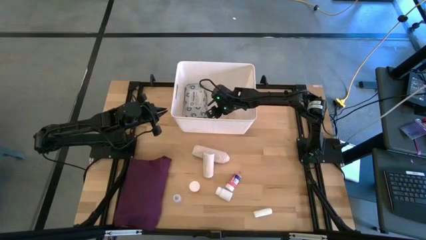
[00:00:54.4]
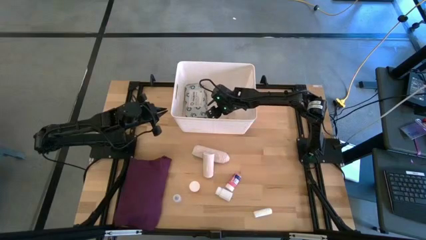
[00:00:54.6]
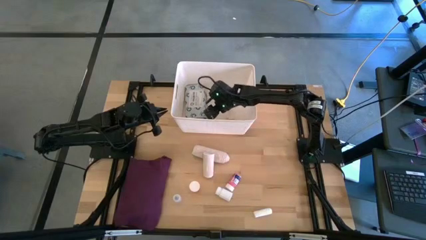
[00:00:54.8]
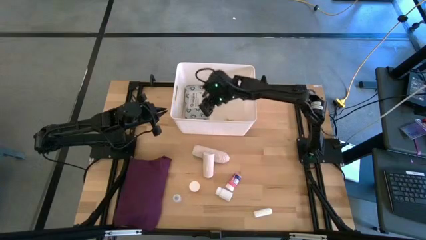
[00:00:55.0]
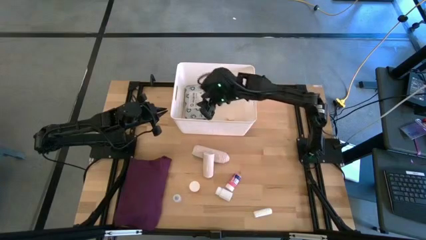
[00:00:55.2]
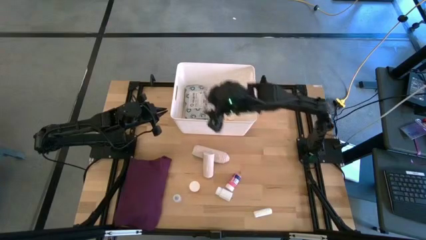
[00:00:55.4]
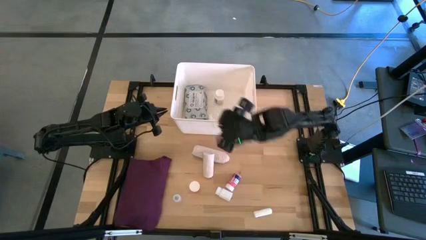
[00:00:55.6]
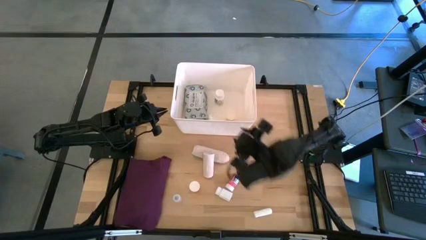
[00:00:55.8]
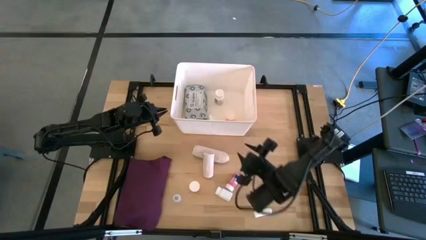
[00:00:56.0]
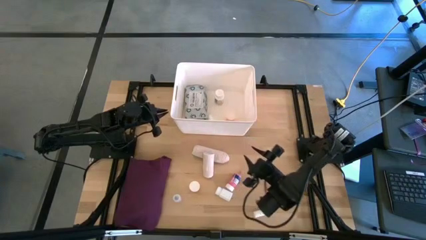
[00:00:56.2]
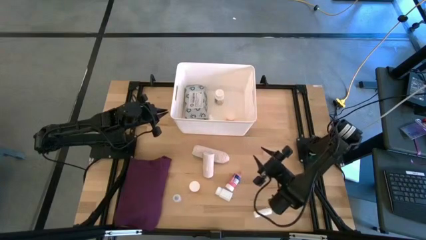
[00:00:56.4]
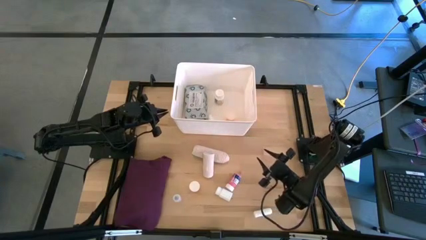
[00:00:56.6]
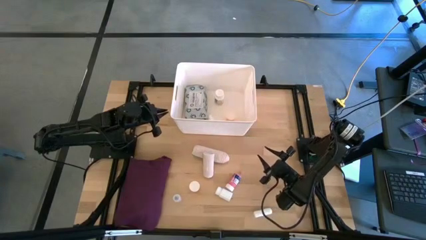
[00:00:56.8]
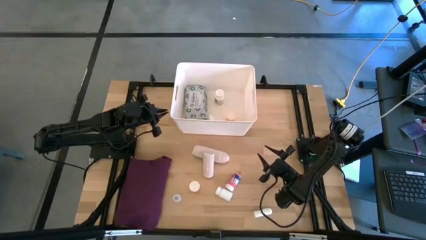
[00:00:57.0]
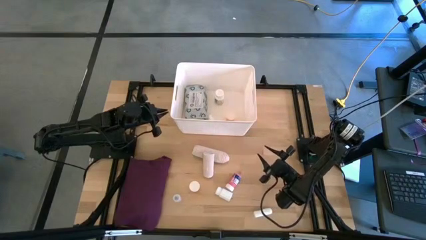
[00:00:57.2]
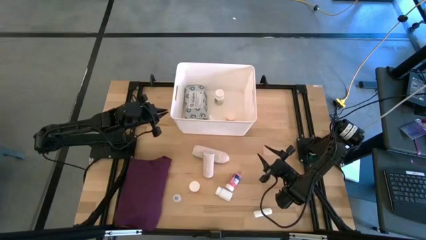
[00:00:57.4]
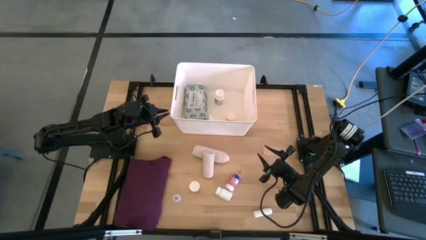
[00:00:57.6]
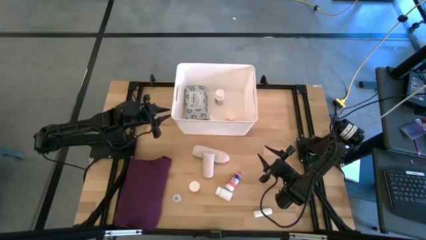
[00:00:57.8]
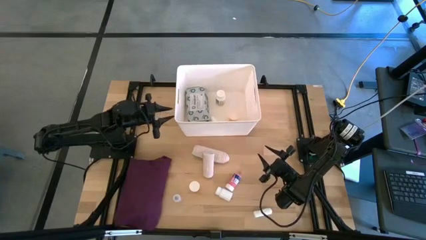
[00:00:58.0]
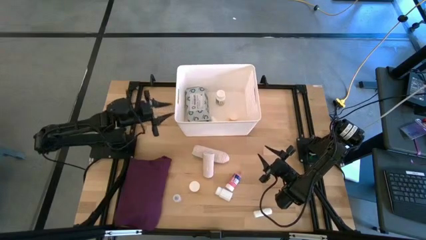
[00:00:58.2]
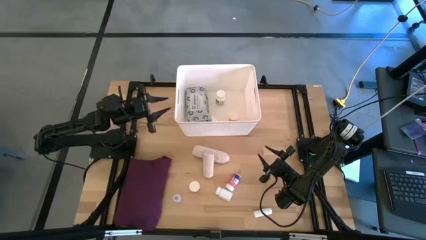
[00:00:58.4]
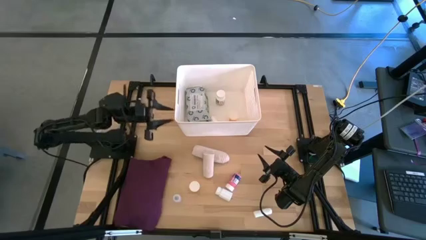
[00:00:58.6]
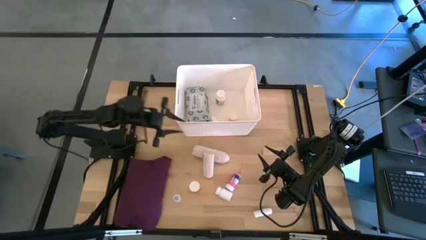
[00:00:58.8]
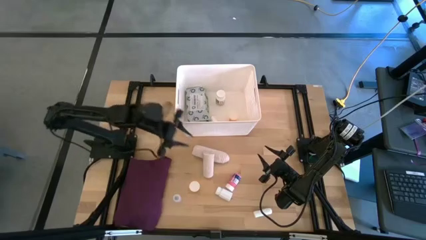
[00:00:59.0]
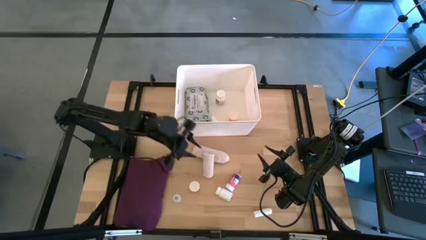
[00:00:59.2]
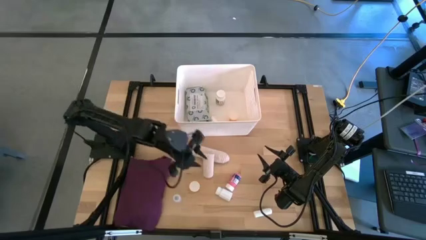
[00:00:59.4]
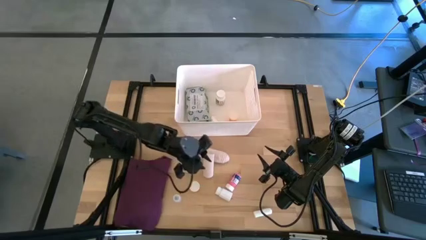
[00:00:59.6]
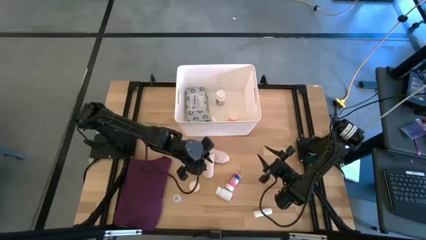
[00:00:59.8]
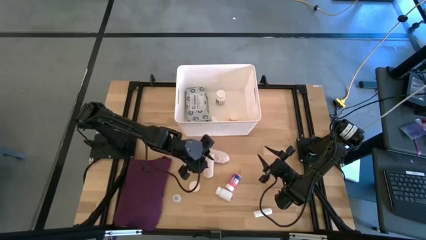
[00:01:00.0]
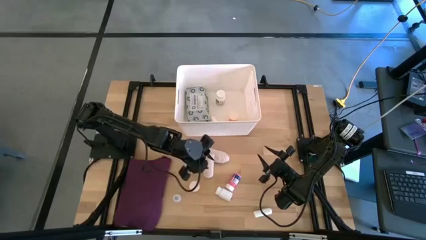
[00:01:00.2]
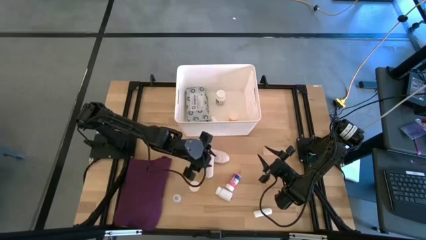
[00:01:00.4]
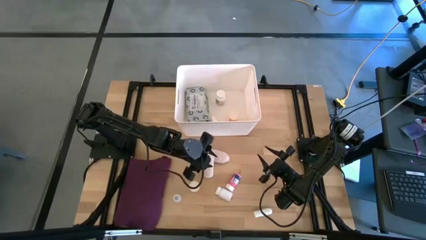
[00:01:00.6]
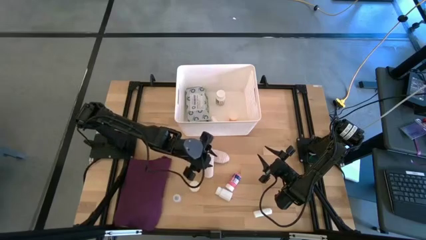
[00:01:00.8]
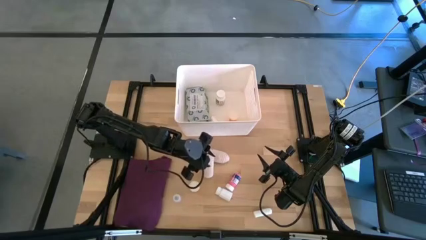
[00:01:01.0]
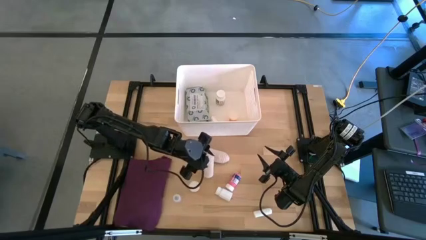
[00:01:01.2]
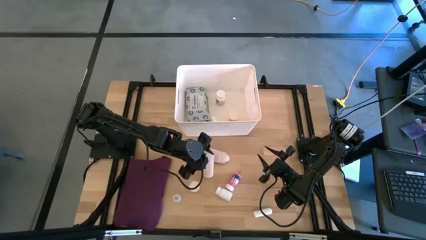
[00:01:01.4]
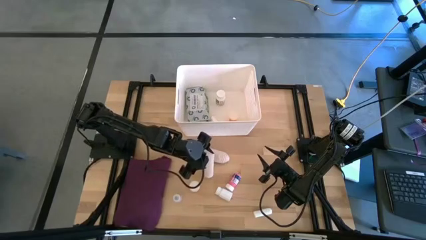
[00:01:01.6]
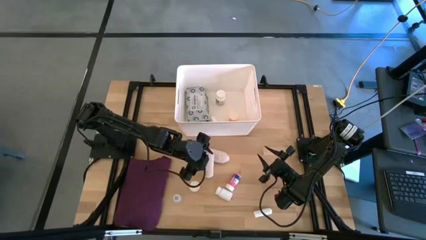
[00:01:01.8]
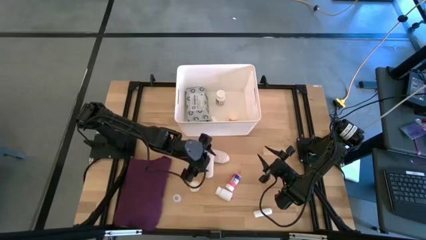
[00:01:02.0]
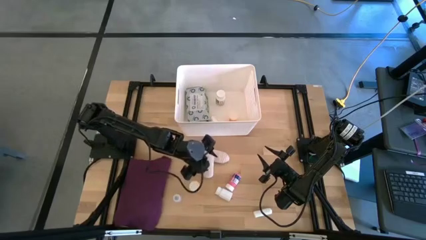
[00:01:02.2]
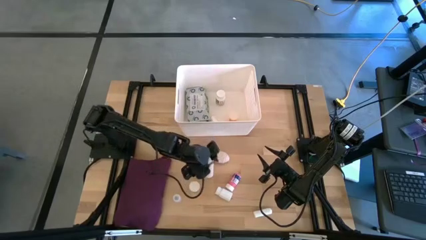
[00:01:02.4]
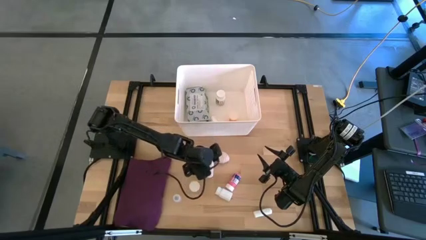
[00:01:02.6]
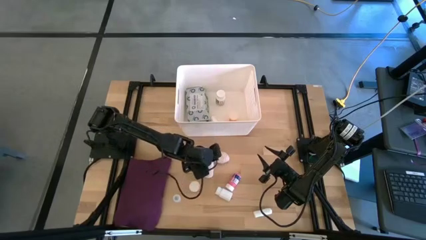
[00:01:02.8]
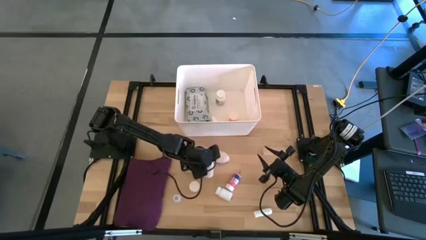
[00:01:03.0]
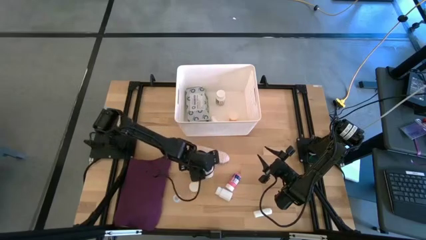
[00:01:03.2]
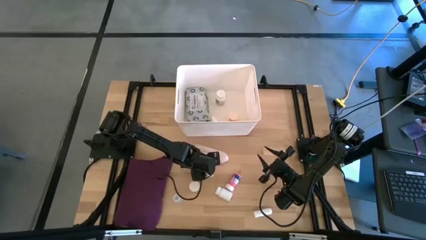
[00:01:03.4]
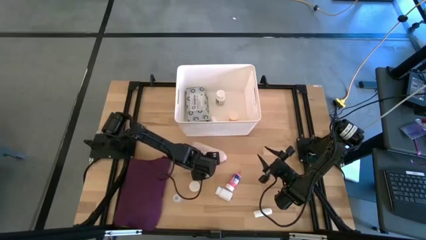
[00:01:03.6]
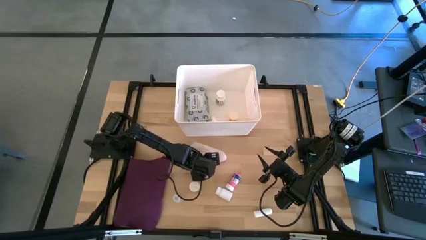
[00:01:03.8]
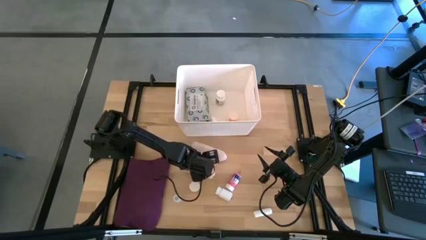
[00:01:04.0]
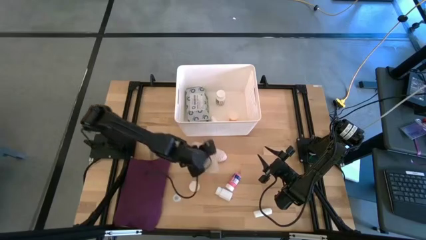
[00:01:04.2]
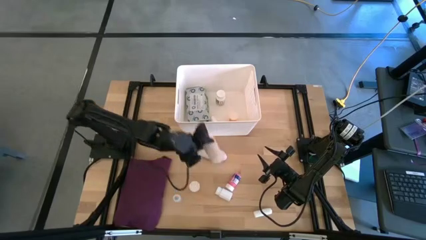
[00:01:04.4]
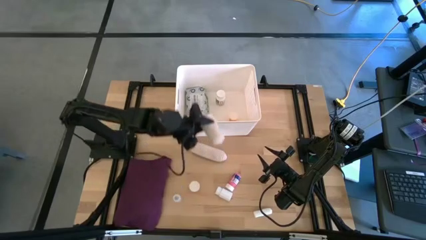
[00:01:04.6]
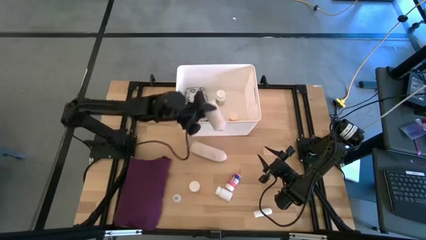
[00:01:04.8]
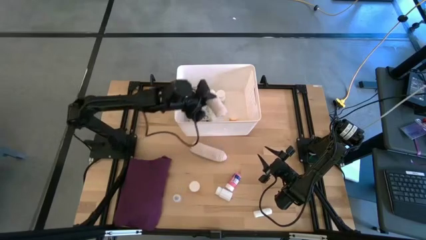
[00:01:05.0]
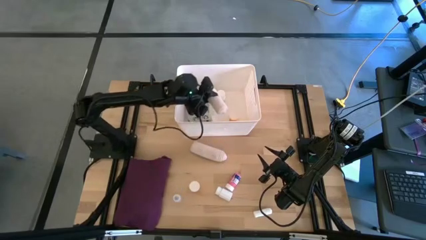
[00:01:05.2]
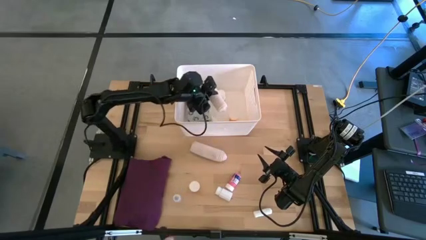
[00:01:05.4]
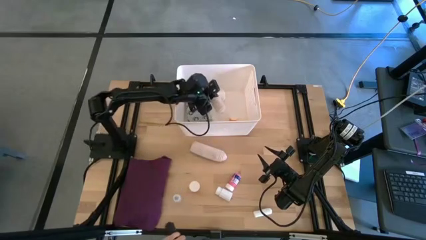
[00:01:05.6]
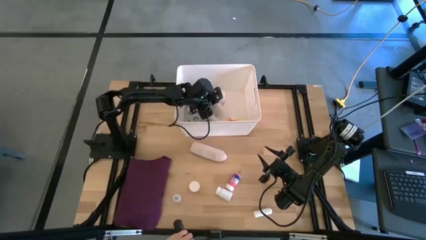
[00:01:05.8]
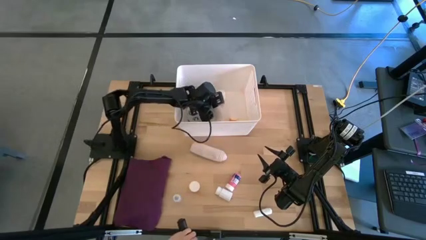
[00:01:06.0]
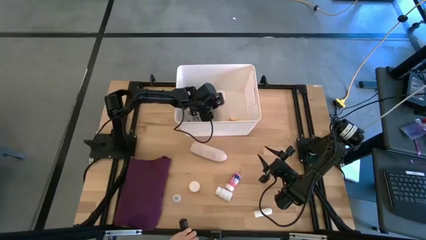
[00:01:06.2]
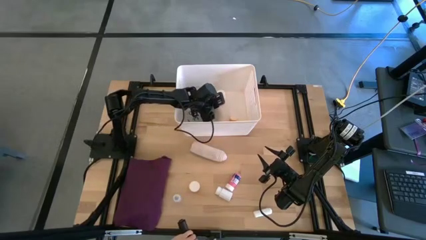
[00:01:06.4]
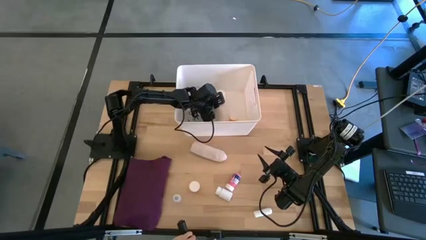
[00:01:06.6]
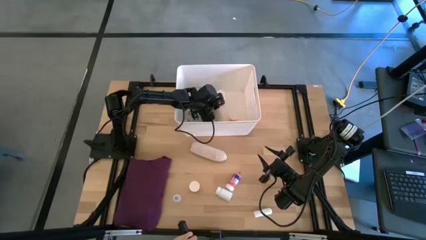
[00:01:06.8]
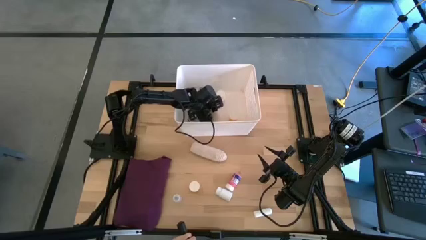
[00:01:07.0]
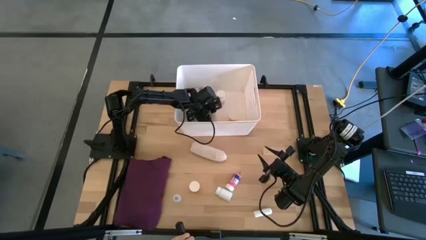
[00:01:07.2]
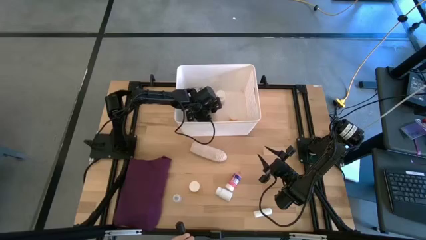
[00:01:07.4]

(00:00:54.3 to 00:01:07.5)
Task: Pick & place medical supplies in basket/bin
Put the top white bandage into the white bin

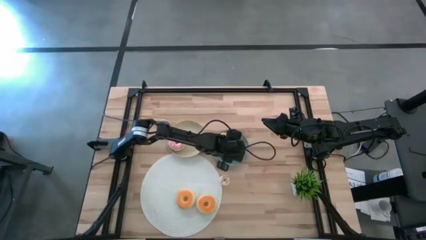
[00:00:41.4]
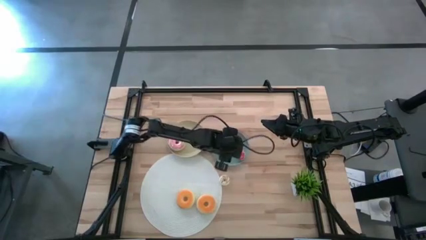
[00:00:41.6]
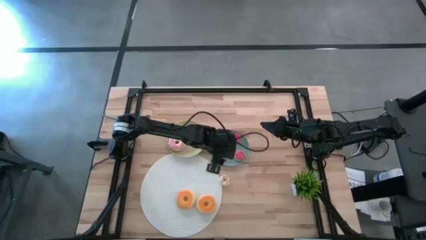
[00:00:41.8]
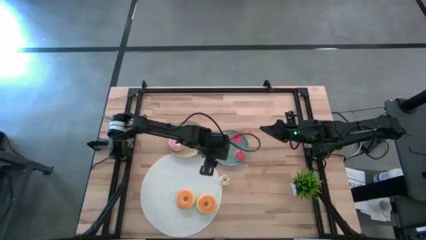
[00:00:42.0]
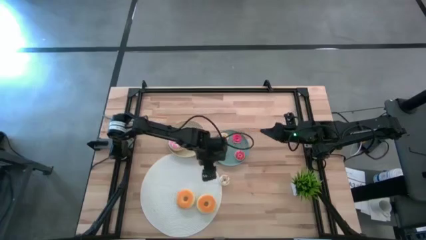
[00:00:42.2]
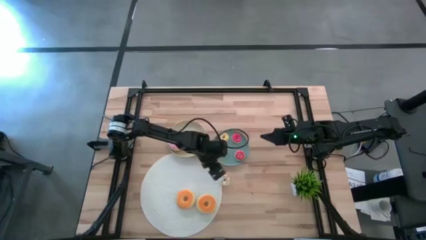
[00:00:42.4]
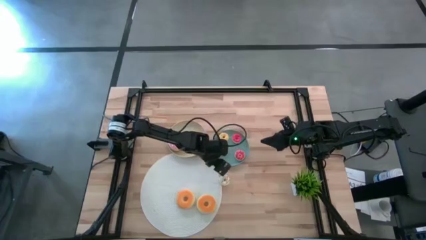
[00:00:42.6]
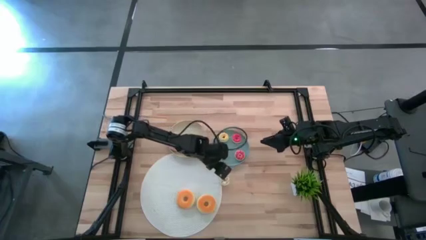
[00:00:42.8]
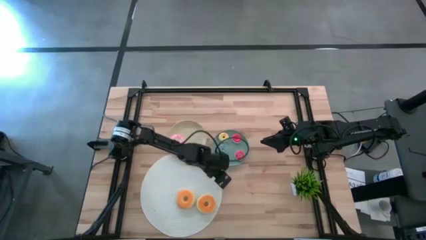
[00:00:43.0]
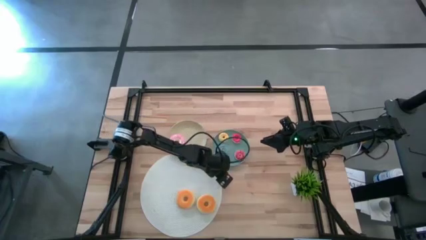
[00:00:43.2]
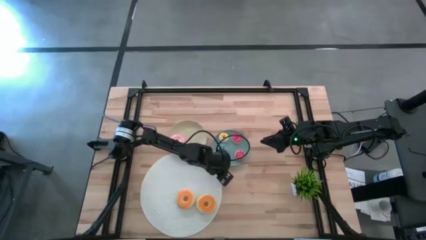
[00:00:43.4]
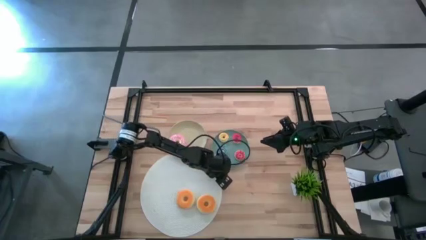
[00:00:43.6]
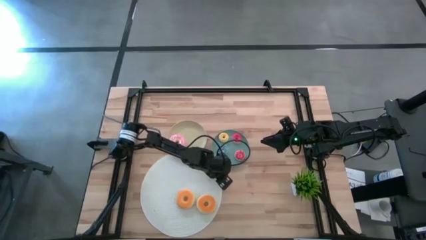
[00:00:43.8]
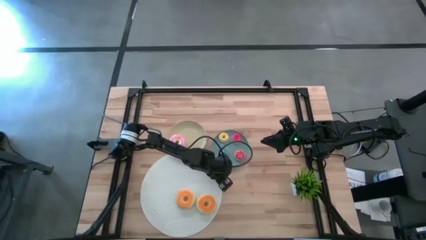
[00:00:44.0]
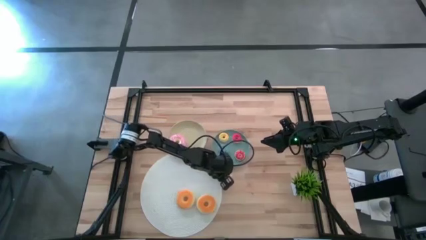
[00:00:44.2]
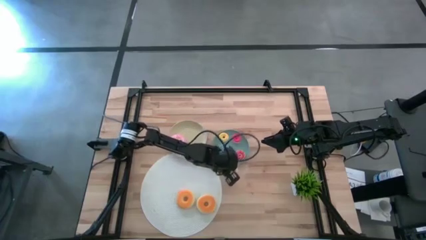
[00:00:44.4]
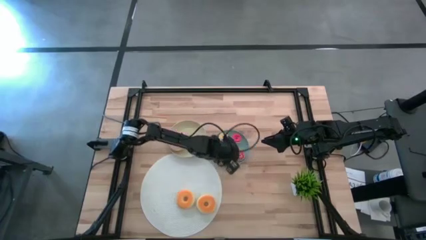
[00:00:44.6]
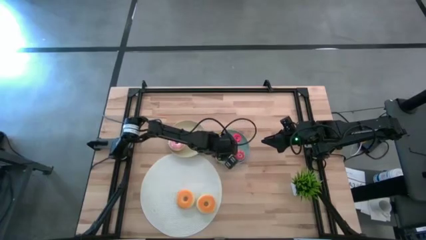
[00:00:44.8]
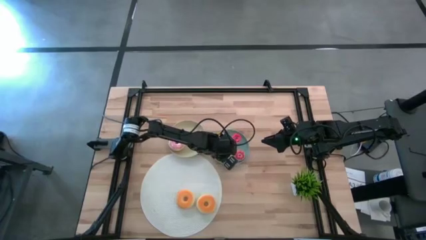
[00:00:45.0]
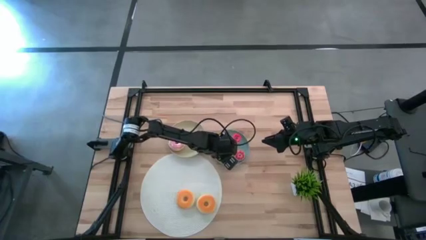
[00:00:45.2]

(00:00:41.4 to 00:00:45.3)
Task: Pick & Place donuts
Put the small white donut on the blue plate
